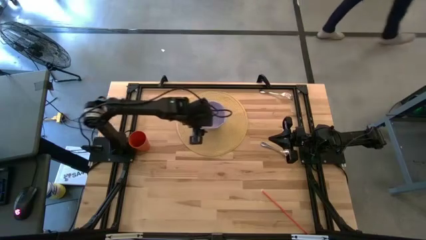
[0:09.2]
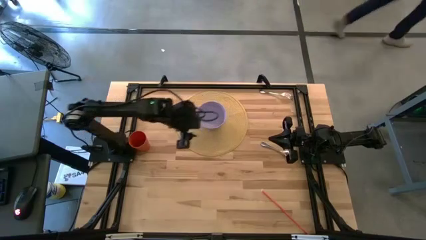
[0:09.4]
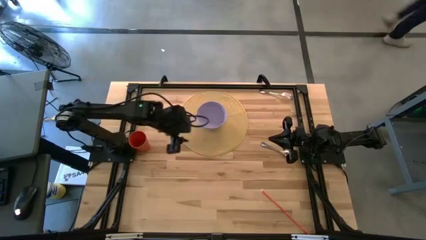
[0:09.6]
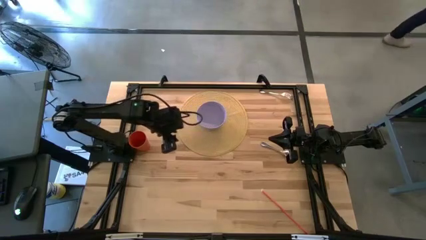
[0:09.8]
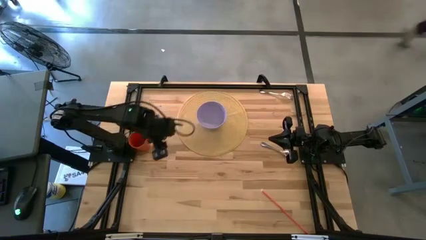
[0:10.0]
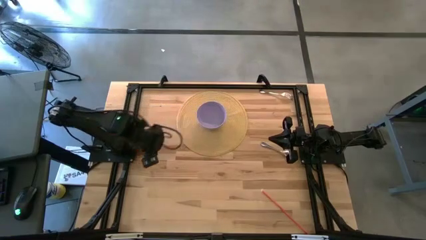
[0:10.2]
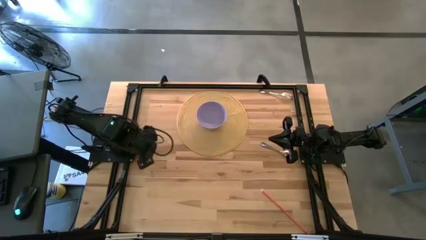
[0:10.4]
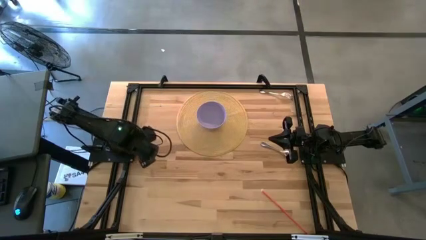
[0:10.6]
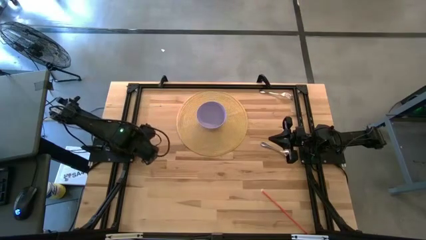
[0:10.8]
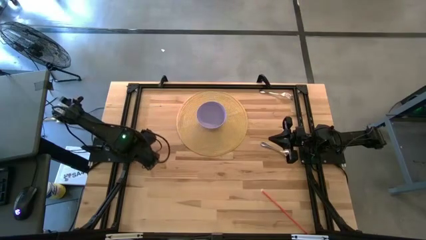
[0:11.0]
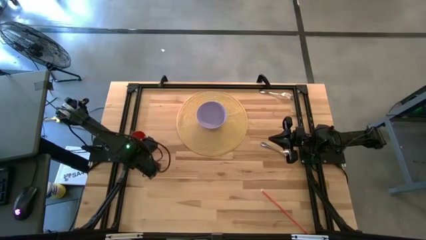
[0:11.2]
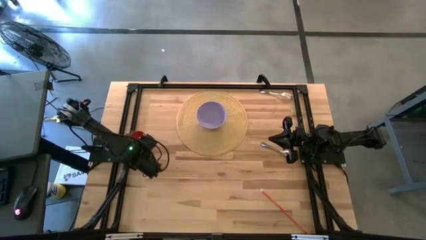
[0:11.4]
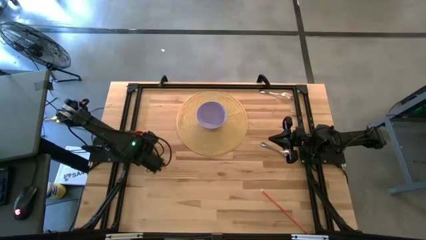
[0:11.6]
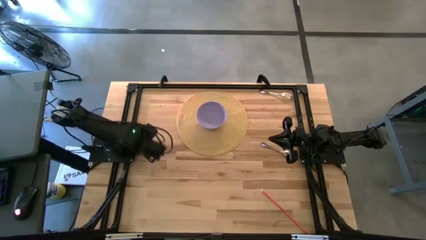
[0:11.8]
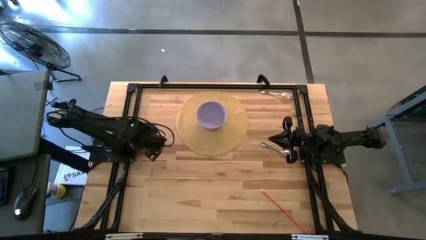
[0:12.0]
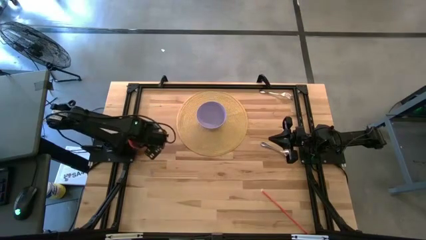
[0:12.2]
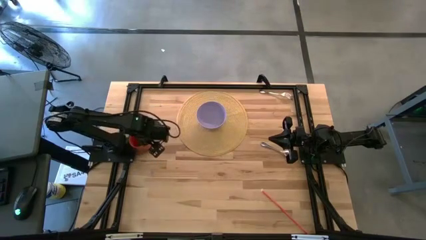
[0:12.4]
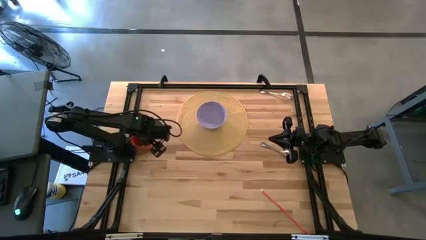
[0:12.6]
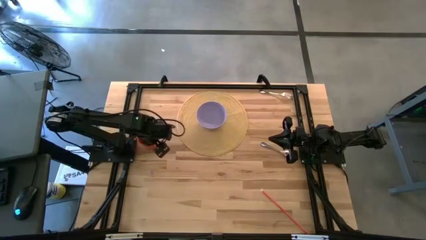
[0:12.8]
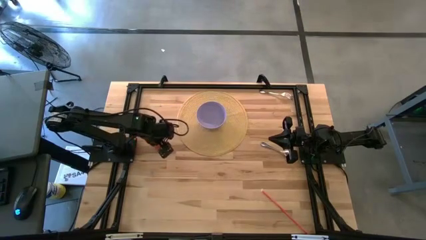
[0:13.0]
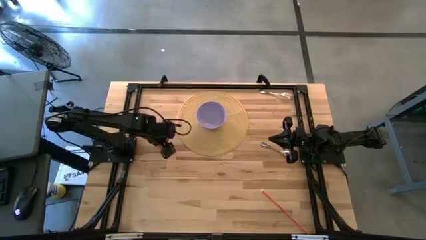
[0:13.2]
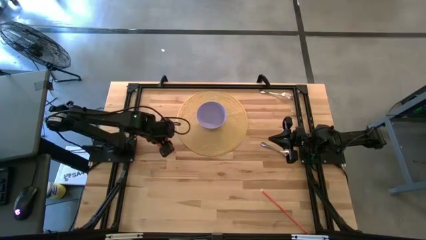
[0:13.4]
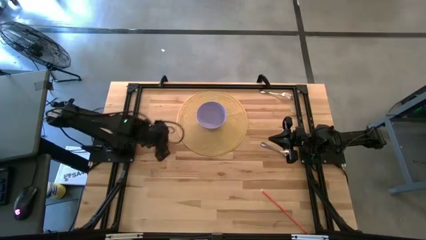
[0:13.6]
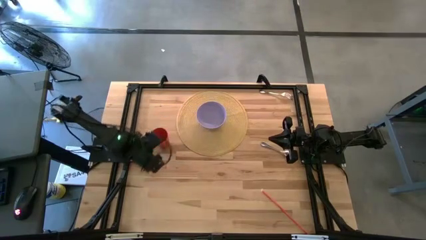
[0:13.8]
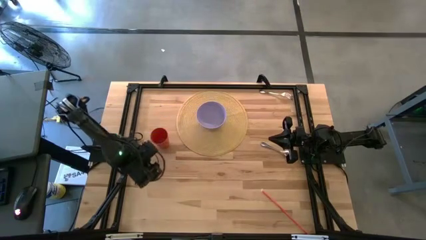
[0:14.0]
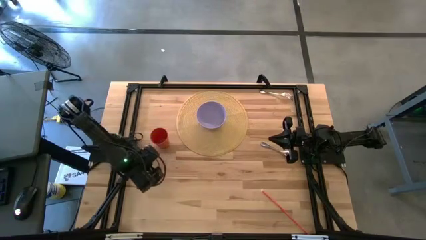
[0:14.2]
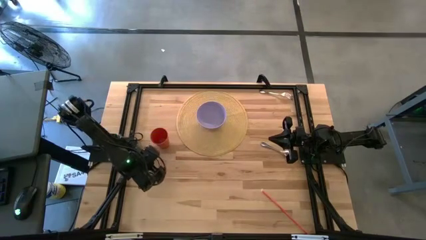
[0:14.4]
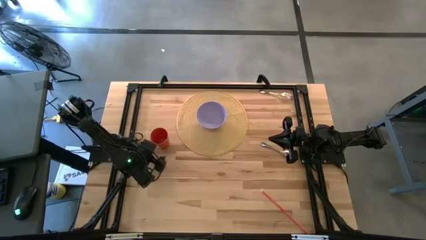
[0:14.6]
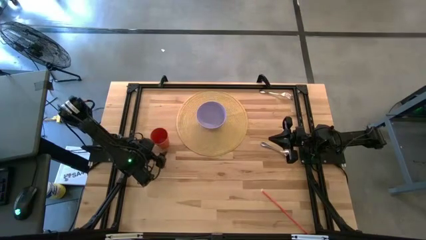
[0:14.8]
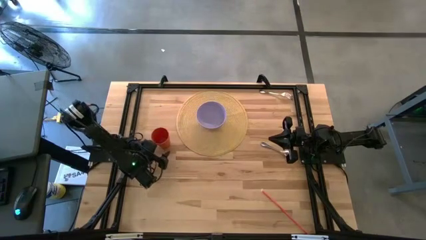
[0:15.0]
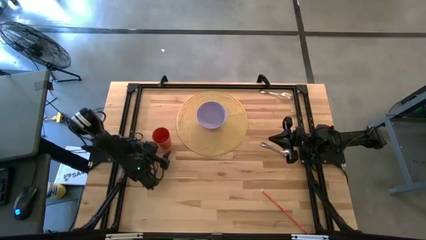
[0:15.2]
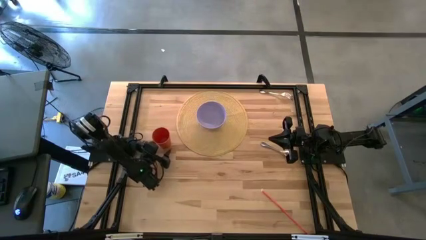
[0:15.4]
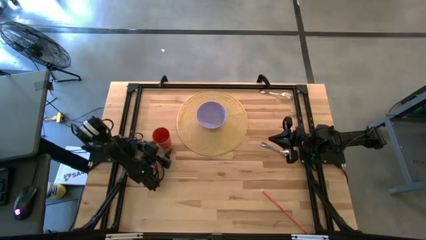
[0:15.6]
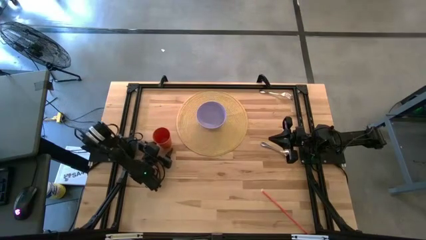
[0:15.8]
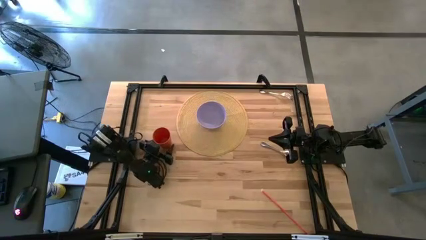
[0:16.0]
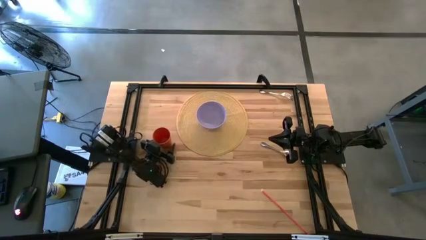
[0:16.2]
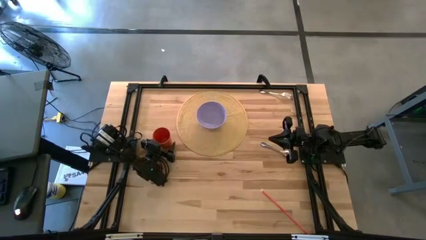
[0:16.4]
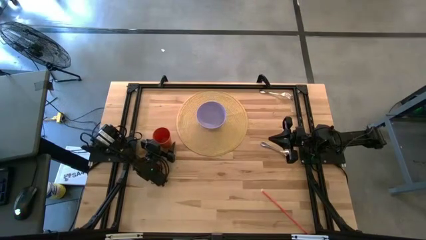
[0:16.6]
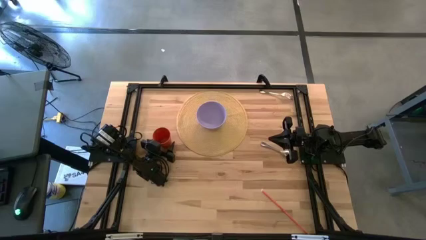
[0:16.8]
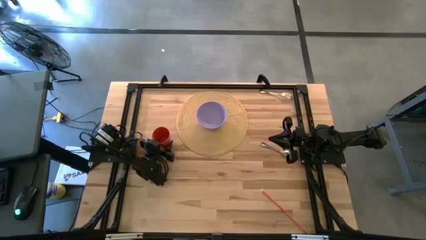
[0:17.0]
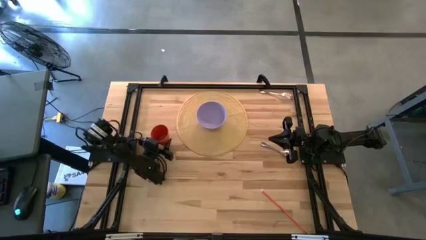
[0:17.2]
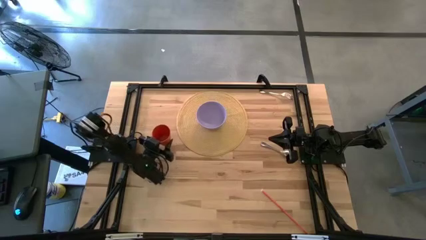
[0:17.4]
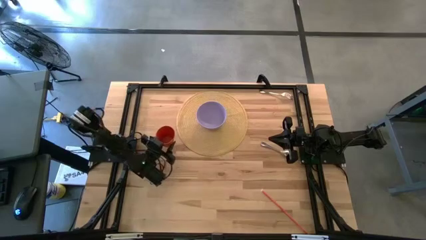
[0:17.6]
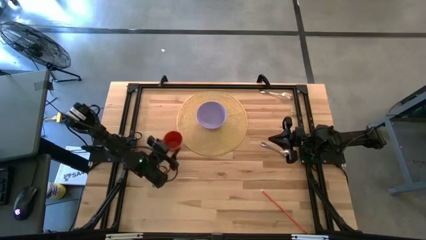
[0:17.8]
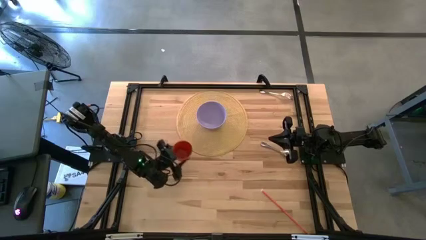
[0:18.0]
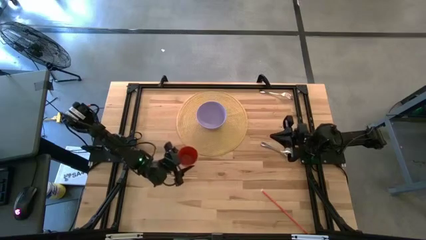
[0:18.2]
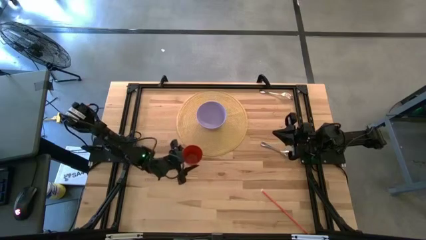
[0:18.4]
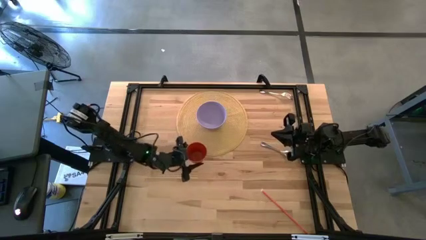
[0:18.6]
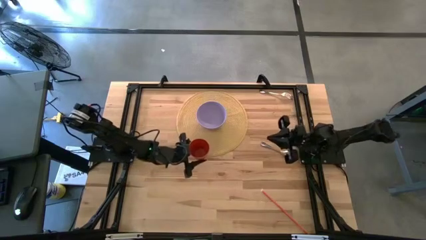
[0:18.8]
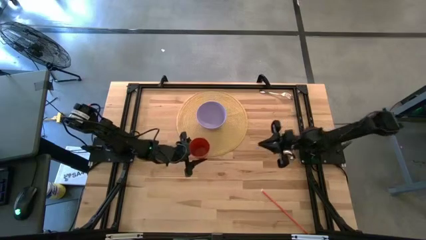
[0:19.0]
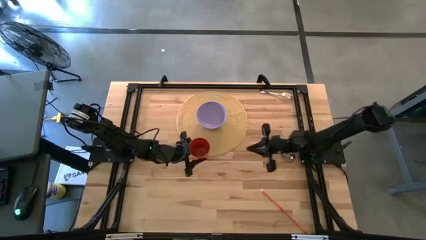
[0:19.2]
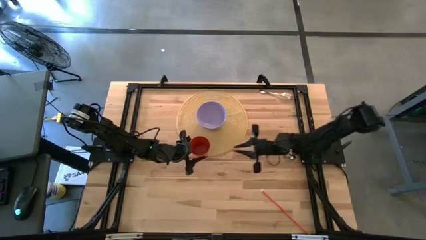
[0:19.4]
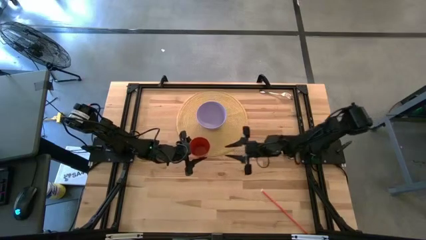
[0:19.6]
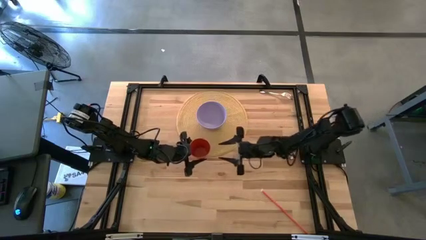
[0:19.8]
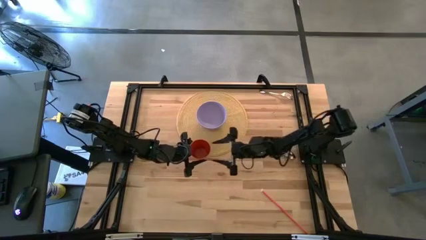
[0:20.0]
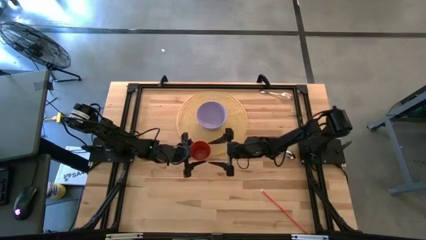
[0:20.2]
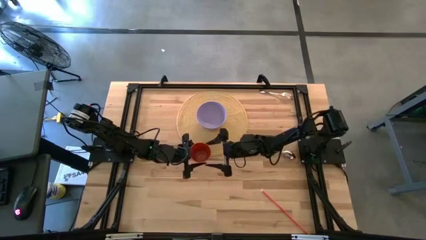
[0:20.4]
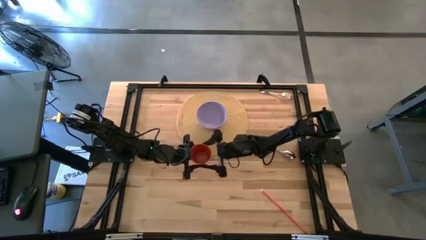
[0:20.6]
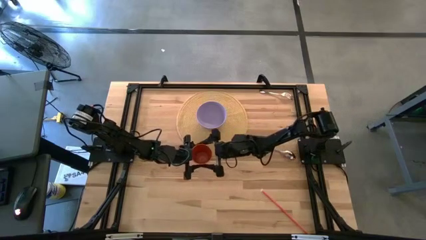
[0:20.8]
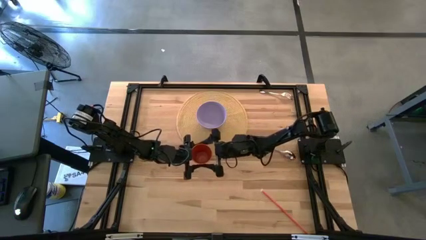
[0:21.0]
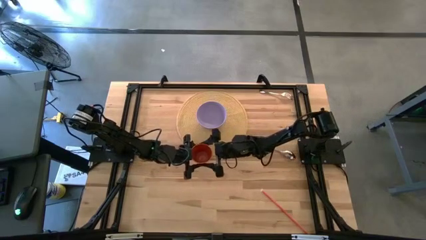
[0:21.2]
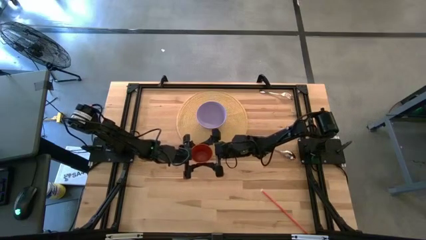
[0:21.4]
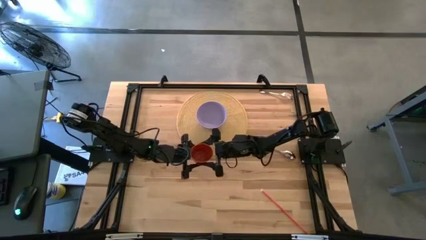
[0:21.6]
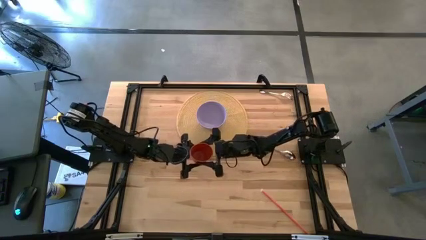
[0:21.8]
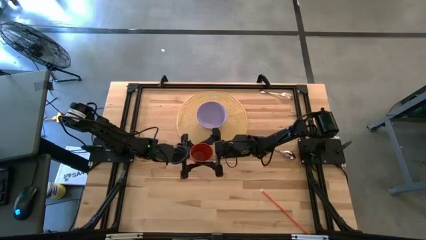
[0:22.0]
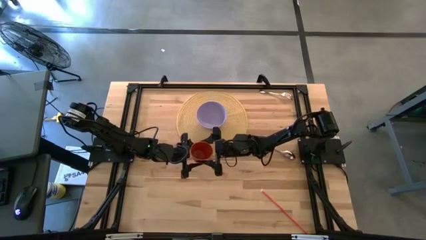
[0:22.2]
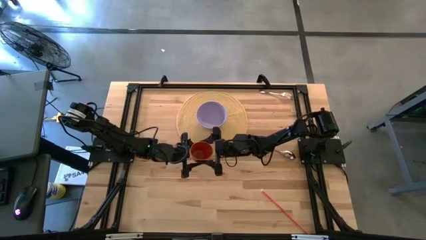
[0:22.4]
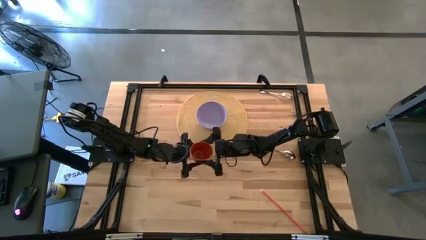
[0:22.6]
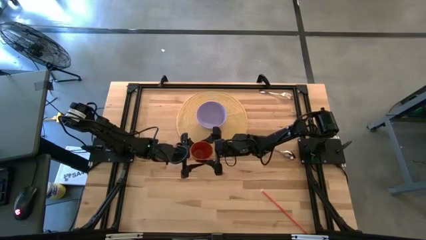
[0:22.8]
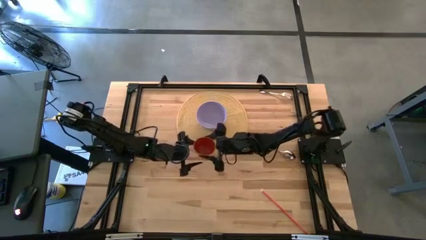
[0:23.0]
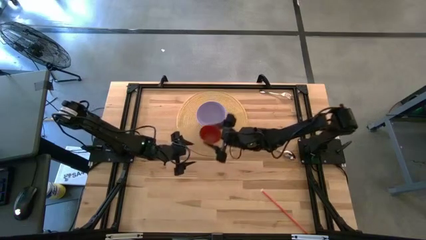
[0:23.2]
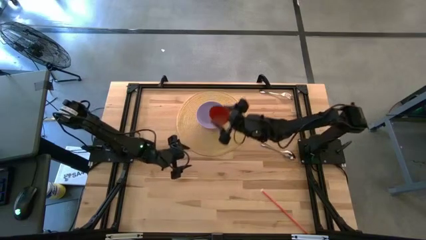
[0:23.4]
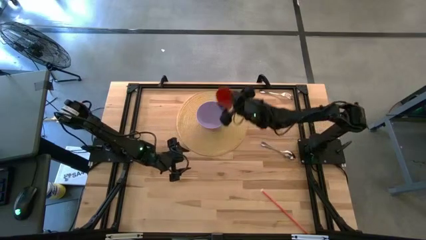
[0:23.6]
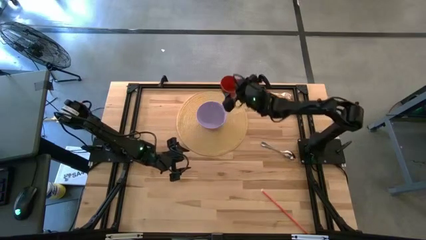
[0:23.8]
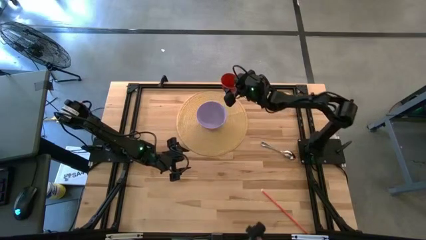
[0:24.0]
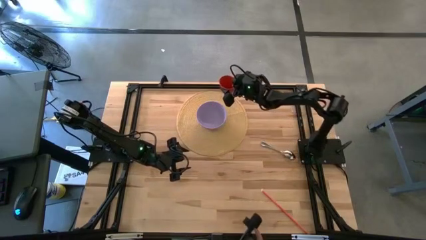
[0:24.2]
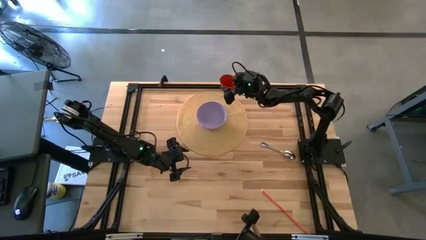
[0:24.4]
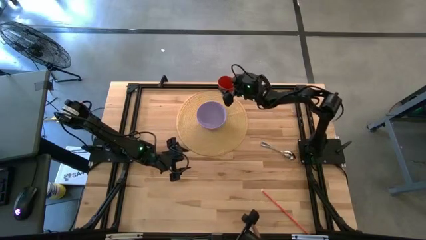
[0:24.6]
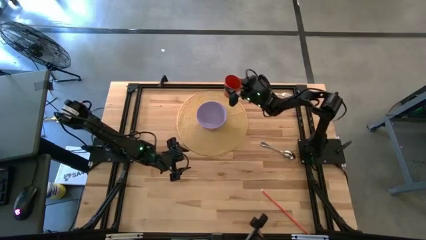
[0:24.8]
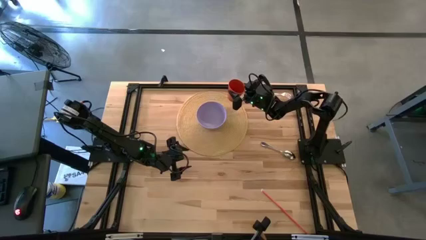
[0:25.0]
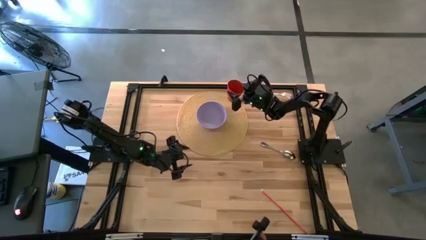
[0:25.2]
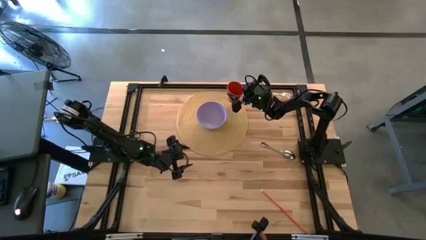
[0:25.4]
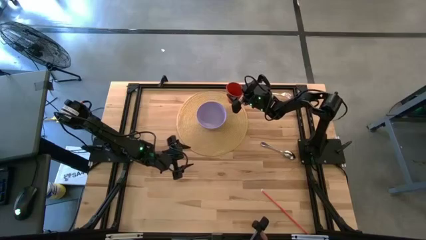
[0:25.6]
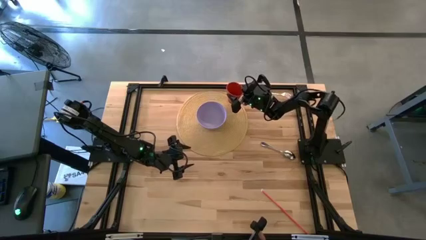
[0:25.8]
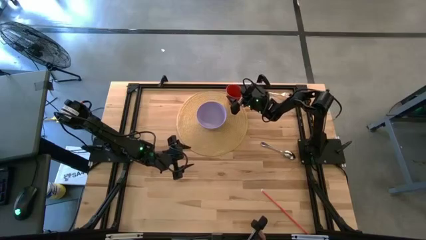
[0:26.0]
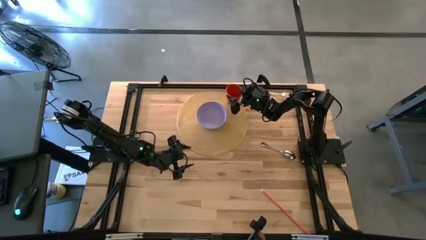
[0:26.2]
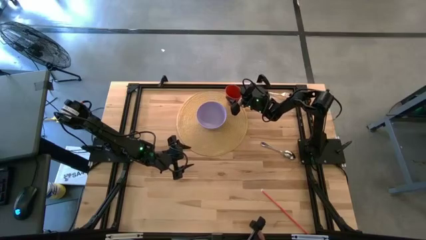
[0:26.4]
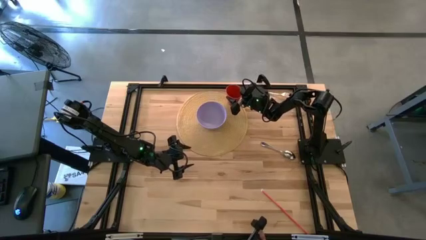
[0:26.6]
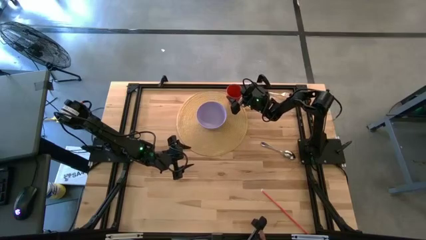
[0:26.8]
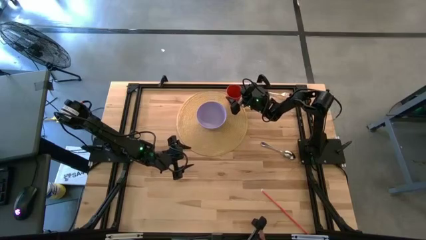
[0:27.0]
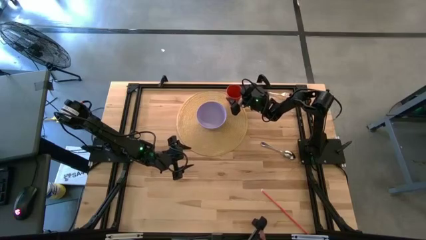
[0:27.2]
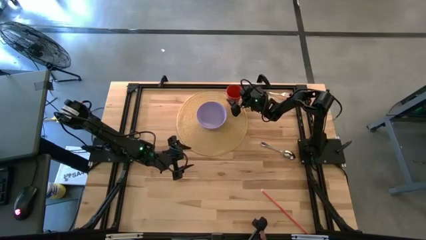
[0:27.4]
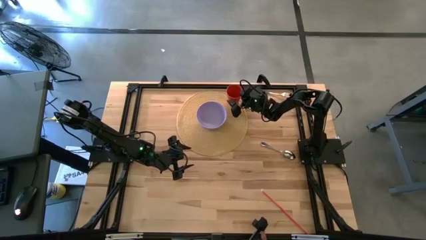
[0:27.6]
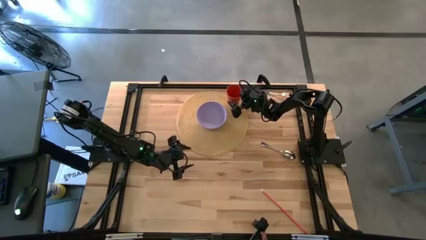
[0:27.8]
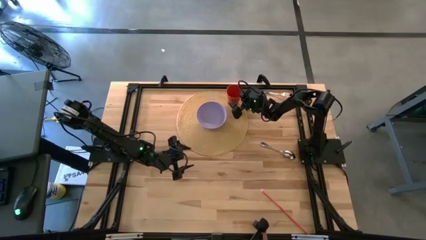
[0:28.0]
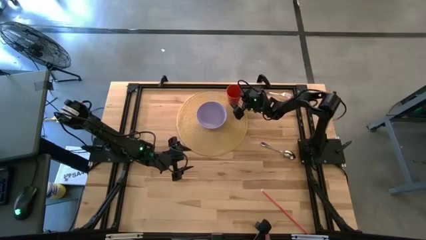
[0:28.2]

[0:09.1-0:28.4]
Task: Pick & Place Utensil
Put the orange cup on the yellow placemat to the top right of the violet bowl
